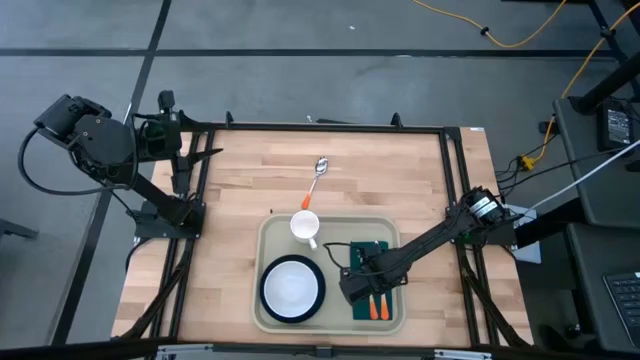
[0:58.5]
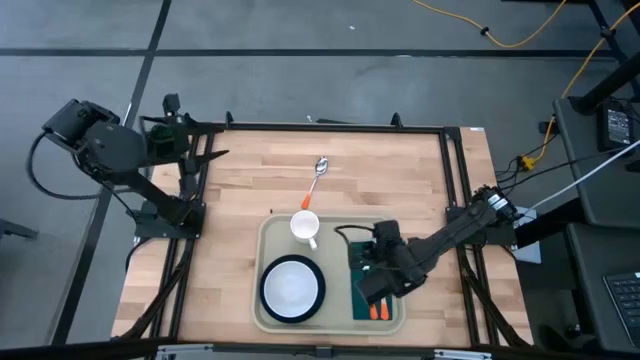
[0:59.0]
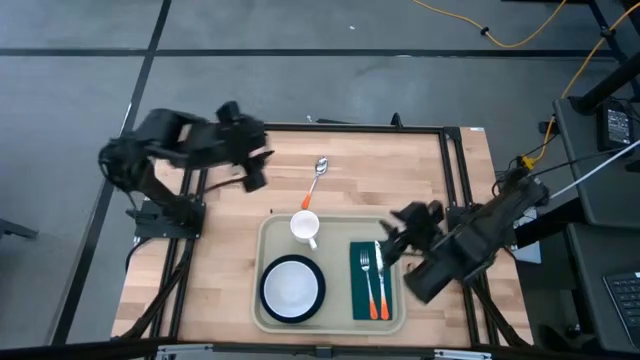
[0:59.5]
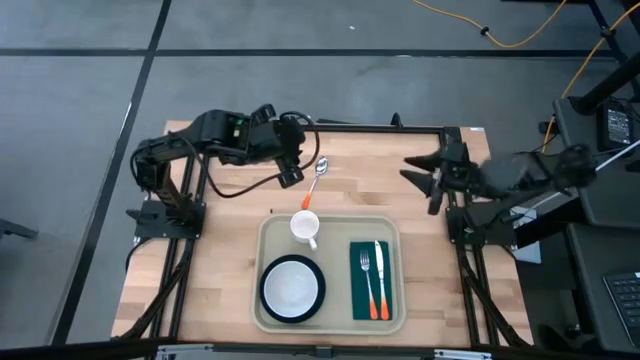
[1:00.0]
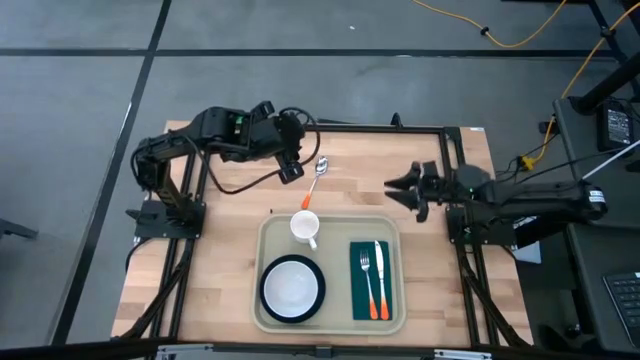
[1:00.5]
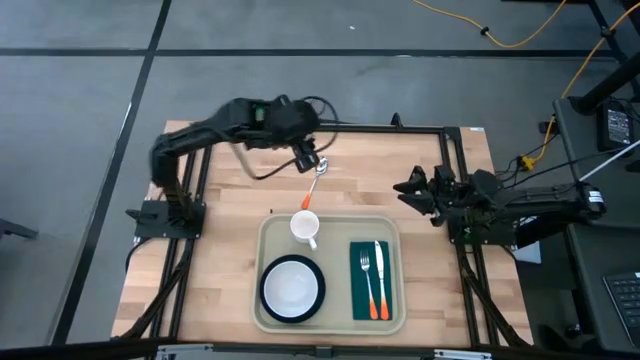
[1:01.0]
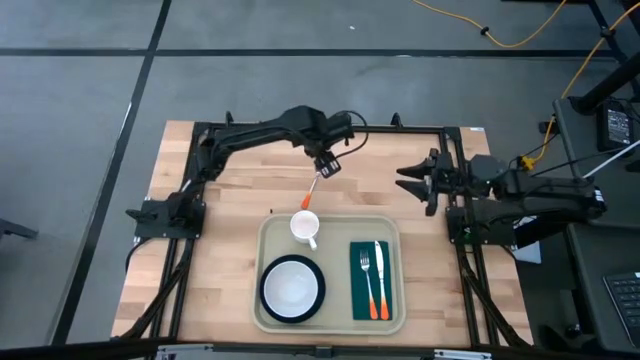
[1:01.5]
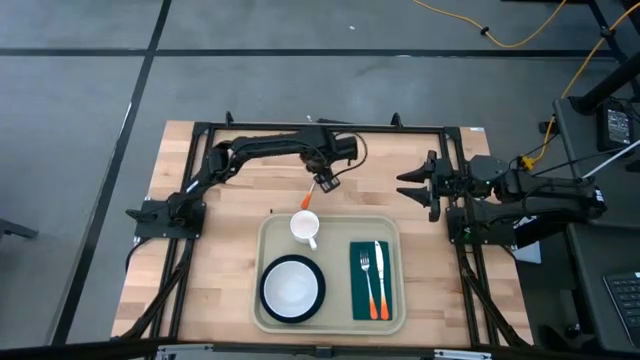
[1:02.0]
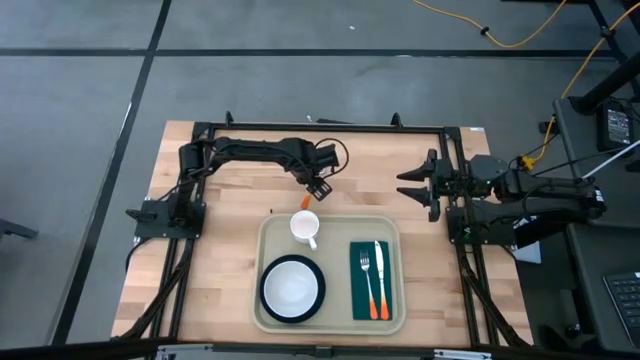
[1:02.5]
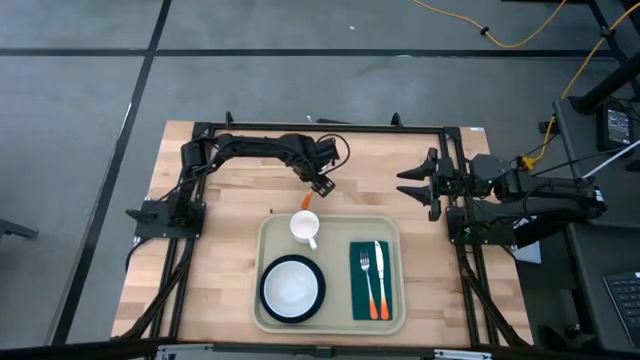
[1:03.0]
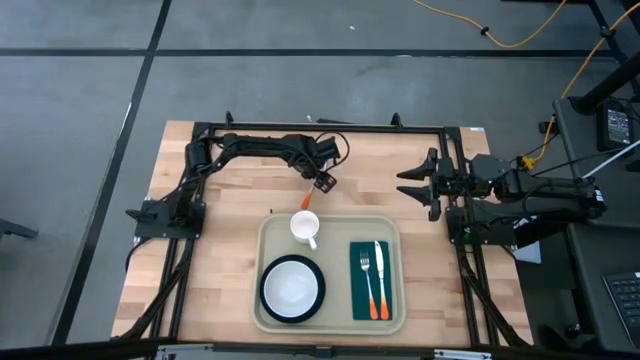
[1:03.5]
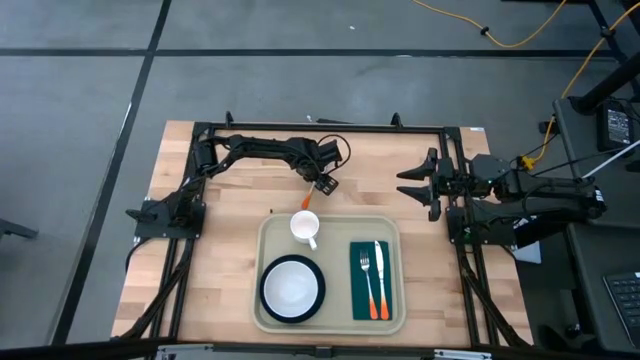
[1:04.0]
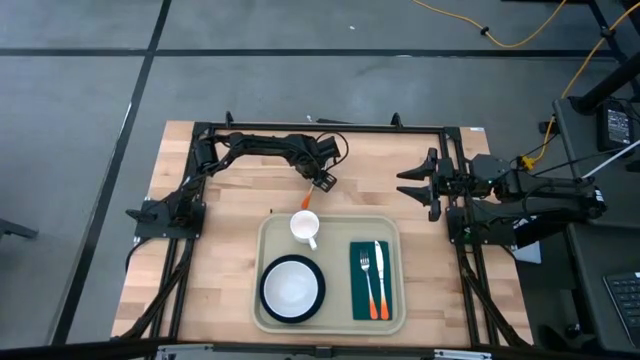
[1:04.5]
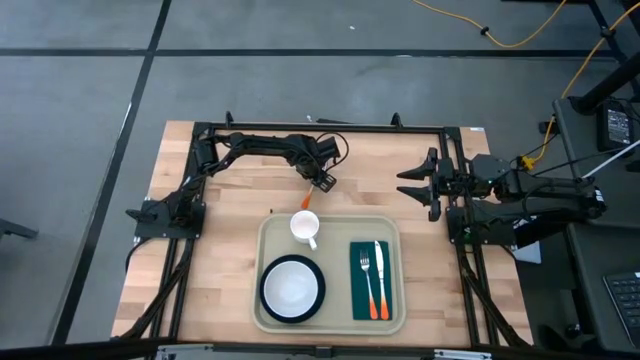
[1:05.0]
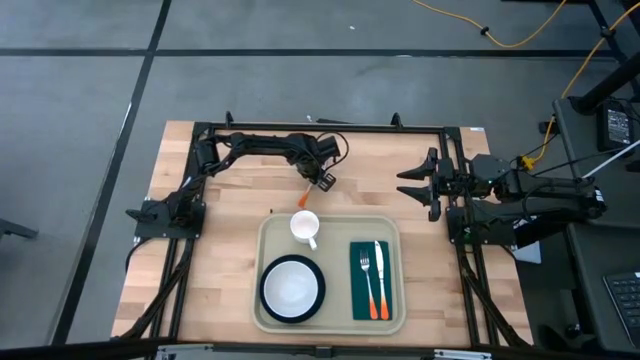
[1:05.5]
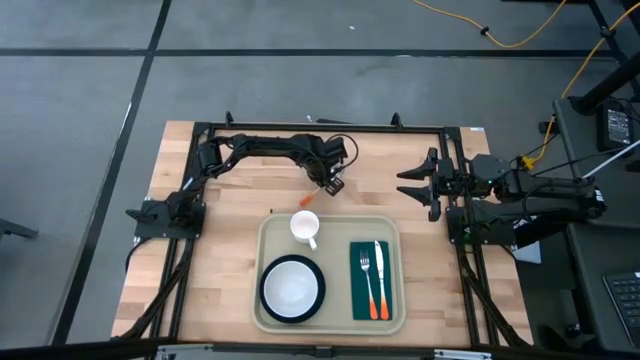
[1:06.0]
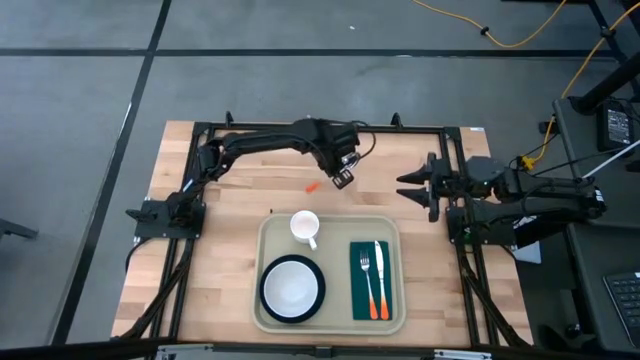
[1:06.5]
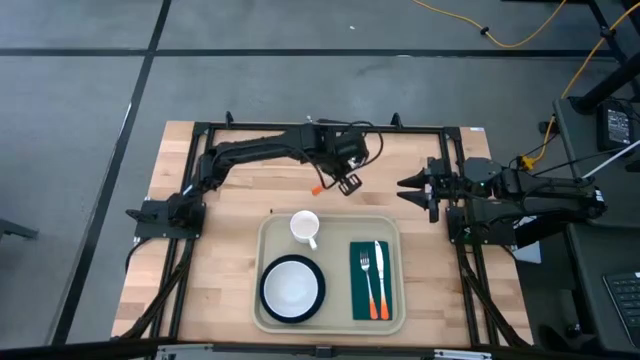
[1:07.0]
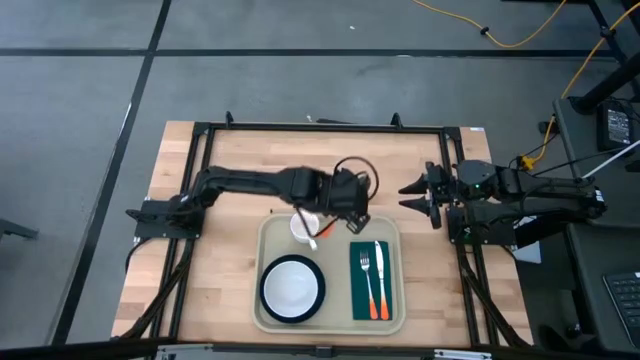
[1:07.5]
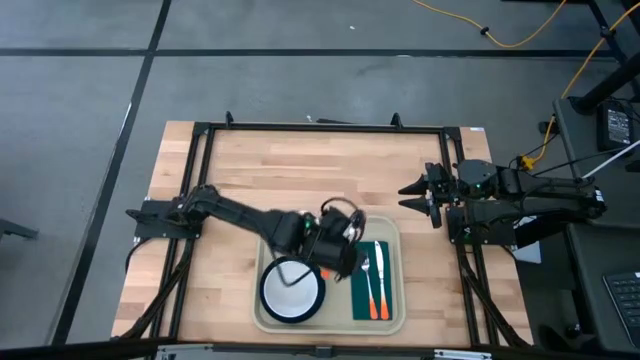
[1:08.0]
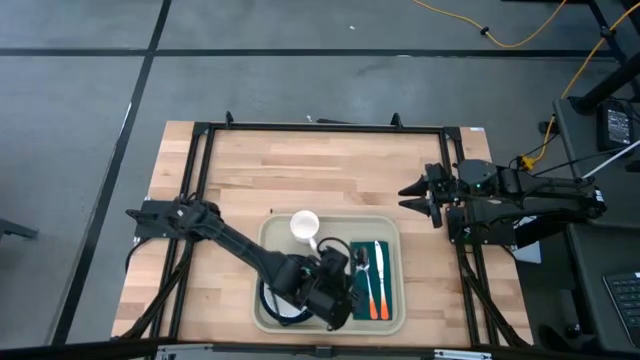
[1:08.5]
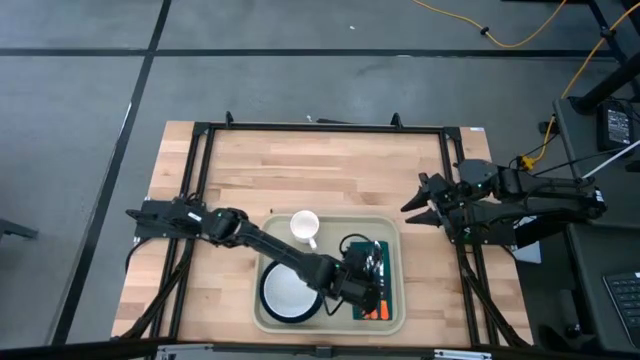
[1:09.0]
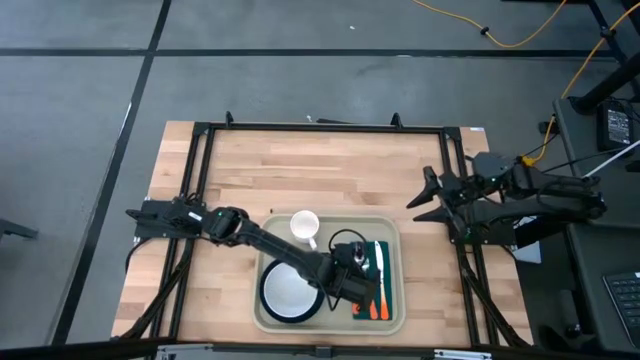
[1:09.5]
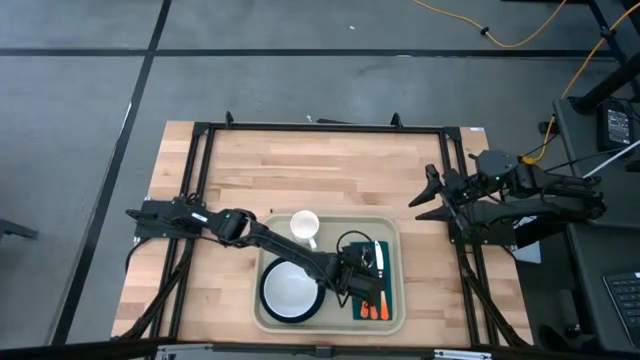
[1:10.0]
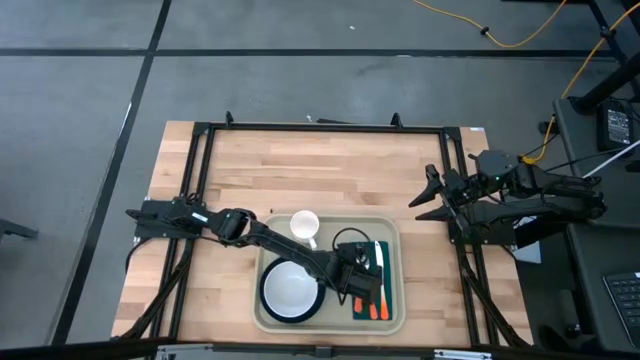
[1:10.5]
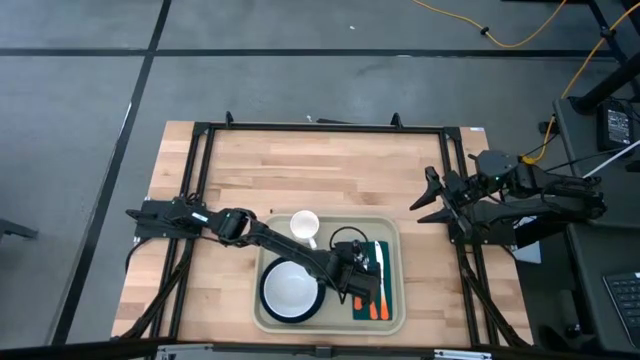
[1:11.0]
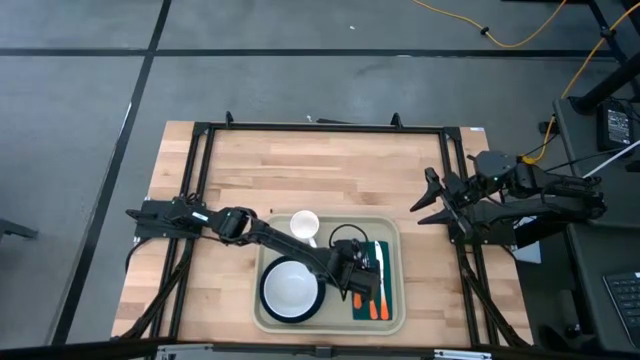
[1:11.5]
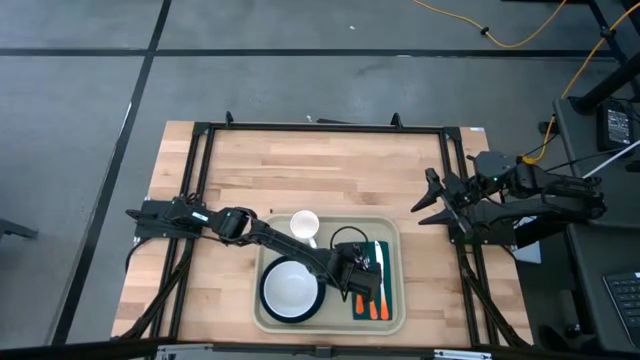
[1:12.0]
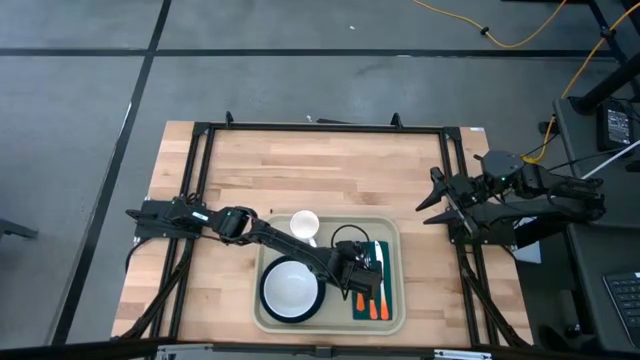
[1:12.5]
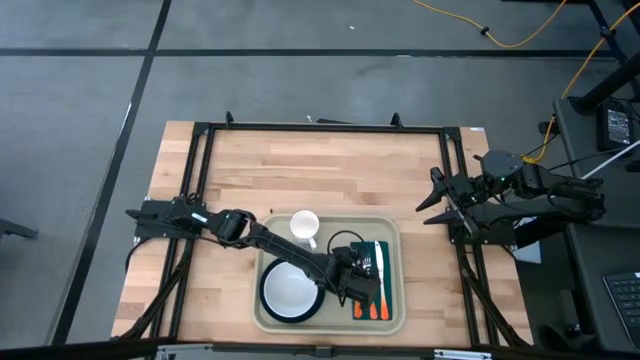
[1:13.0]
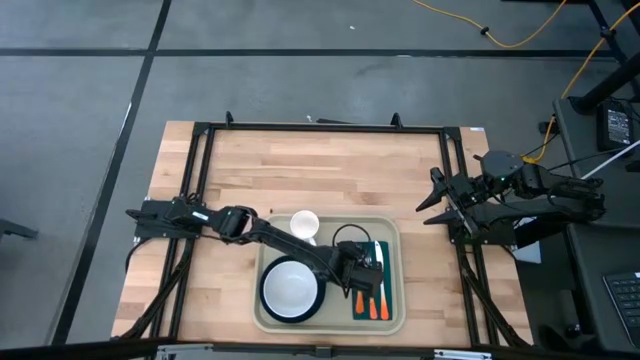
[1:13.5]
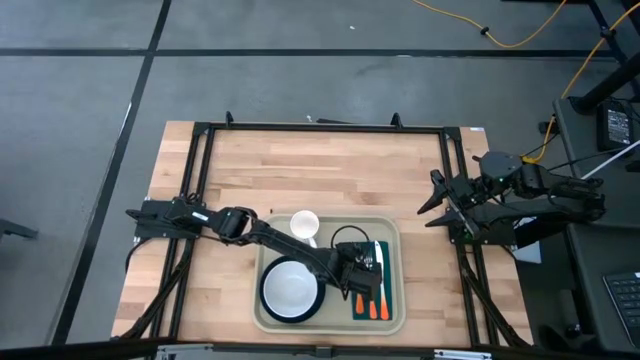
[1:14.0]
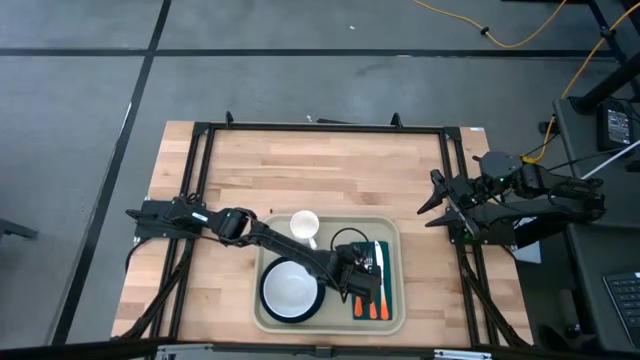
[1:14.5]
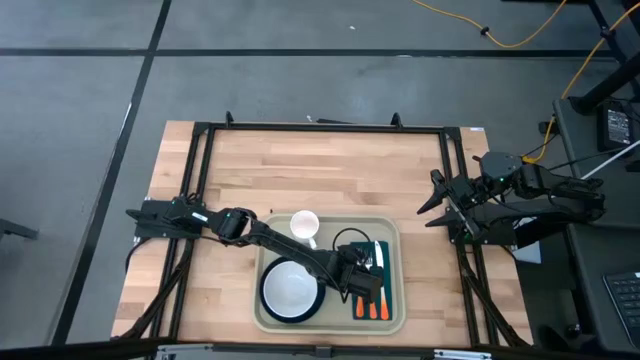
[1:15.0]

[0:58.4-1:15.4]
Task: Set up tray
Put the orange spoon on the dark green napkin to the left of the orange fork

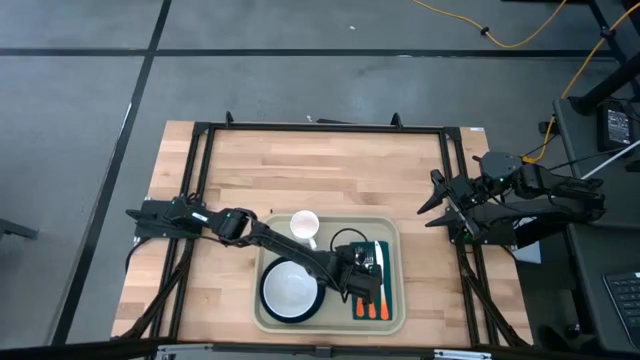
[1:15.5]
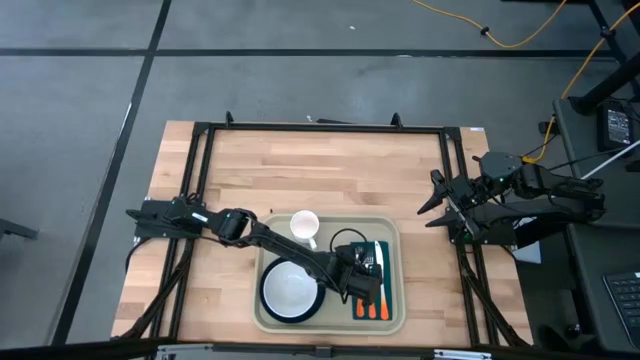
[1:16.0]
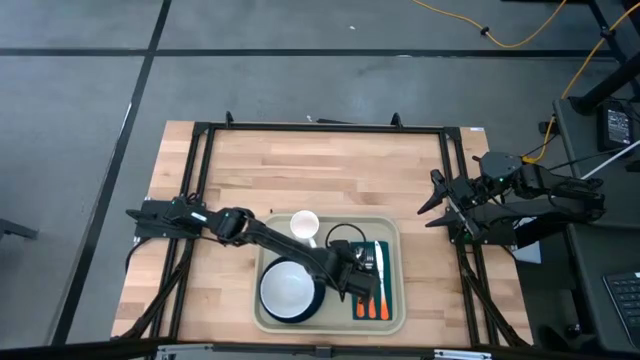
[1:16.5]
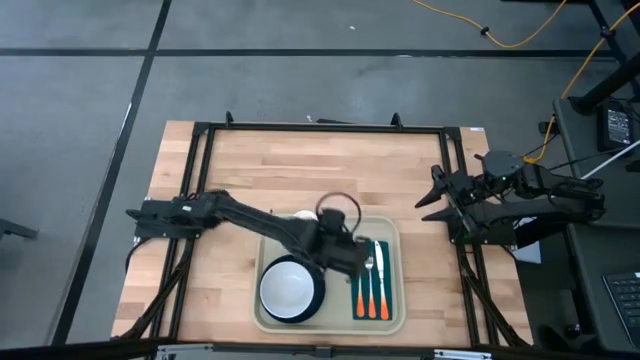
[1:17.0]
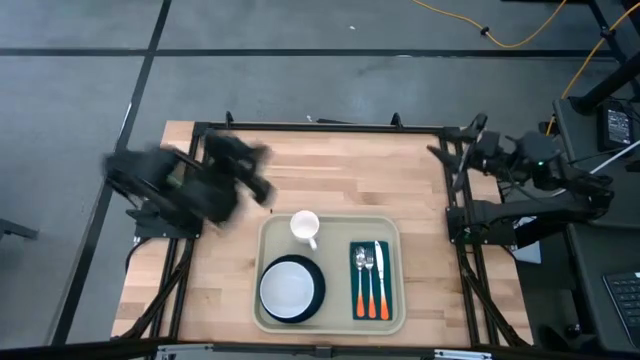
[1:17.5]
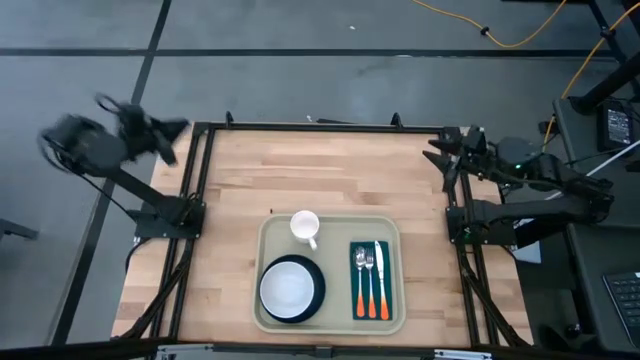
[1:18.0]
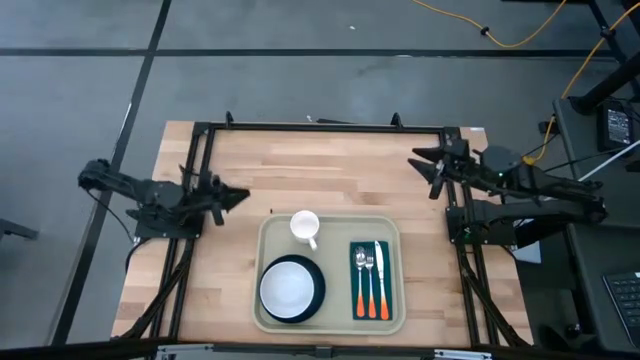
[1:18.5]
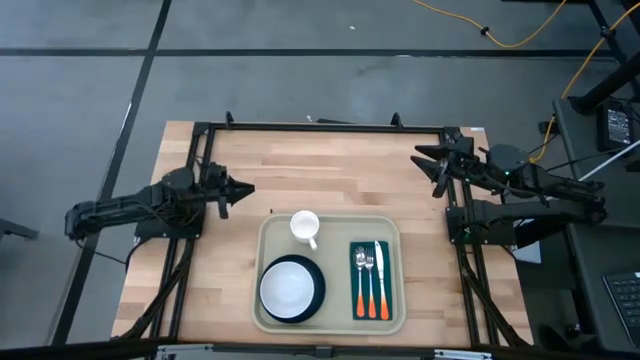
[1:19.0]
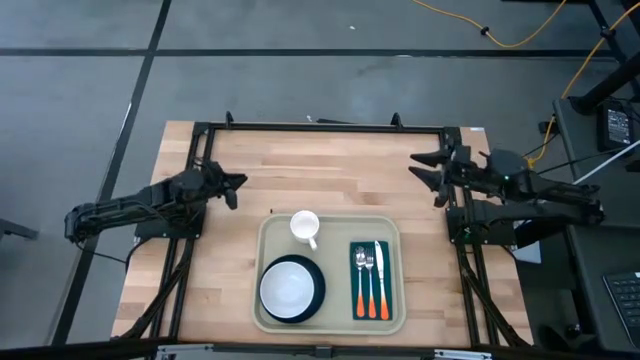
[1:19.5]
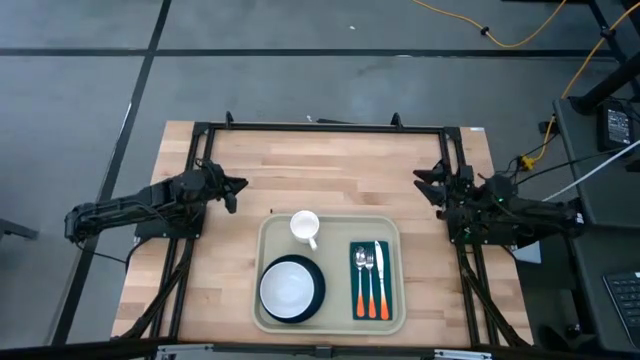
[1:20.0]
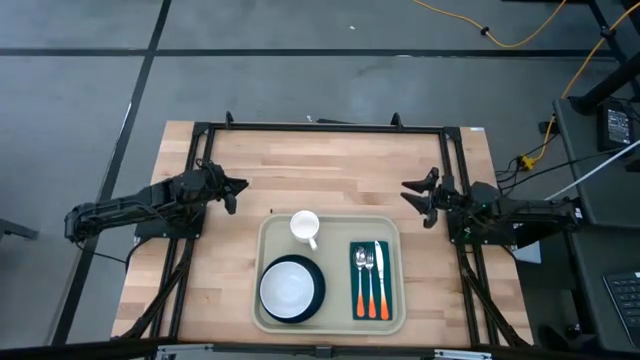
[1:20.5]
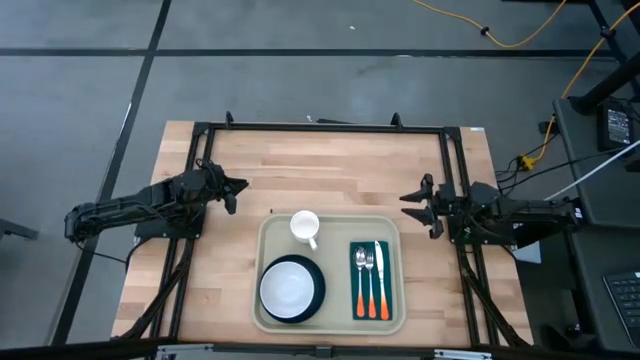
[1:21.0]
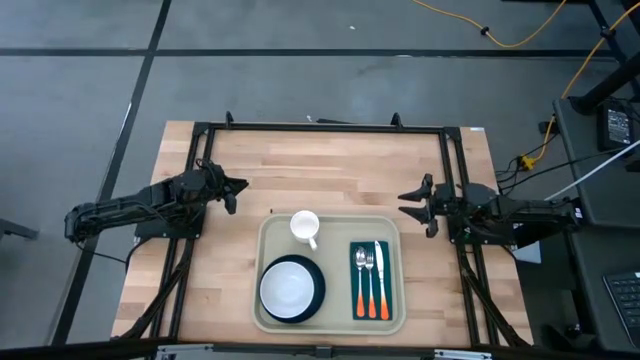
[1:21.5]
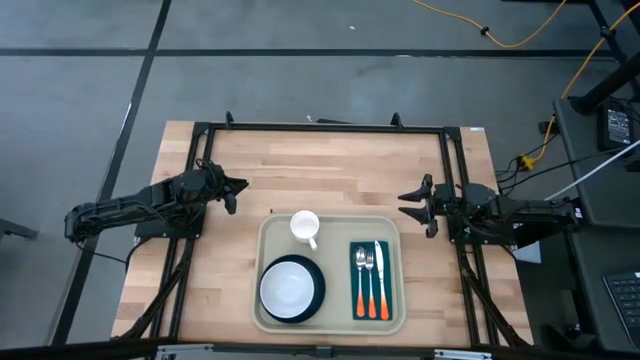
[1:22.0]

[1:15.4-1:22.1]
Return to Home Position
